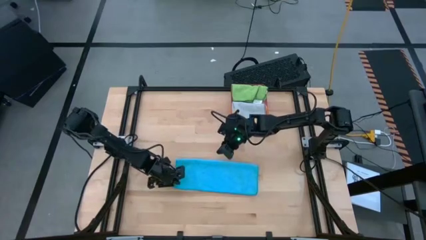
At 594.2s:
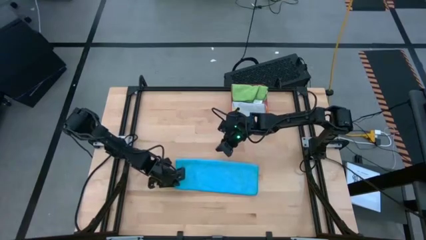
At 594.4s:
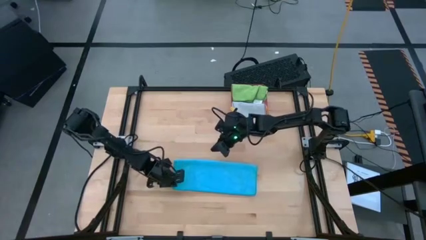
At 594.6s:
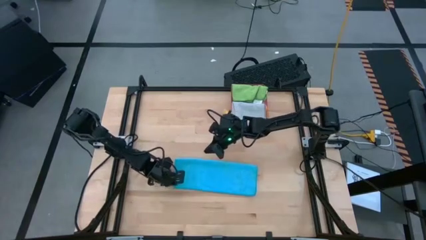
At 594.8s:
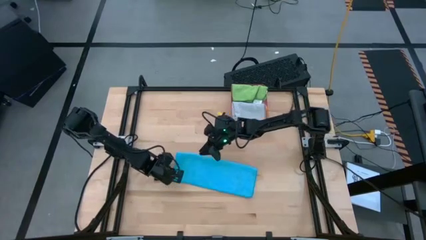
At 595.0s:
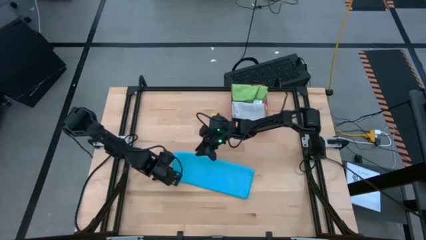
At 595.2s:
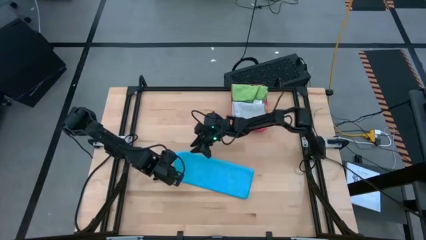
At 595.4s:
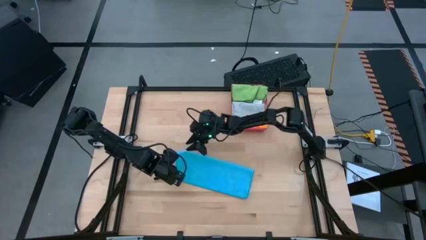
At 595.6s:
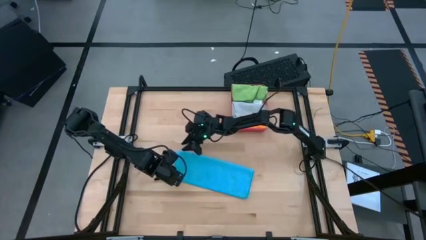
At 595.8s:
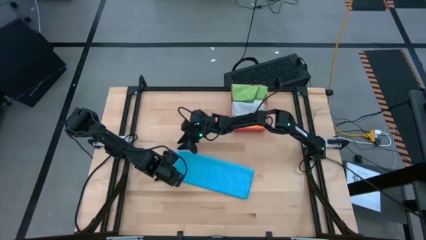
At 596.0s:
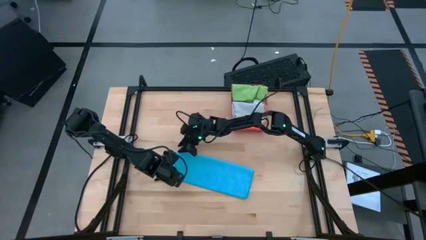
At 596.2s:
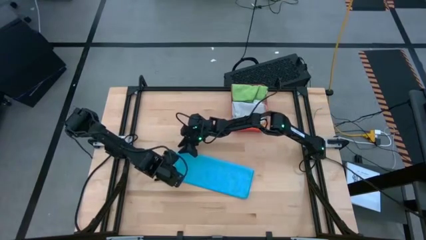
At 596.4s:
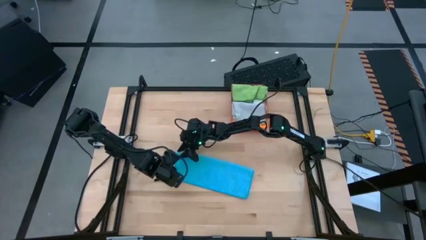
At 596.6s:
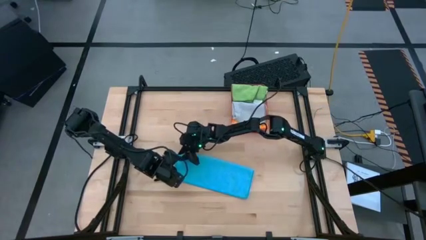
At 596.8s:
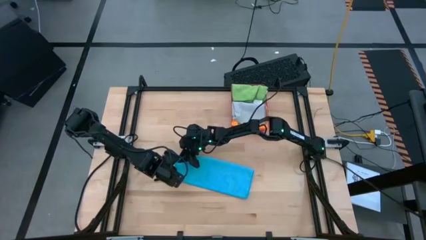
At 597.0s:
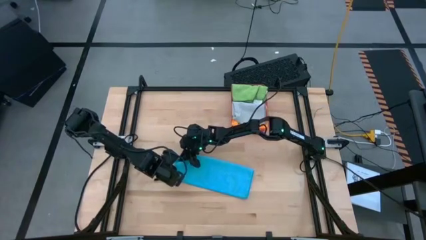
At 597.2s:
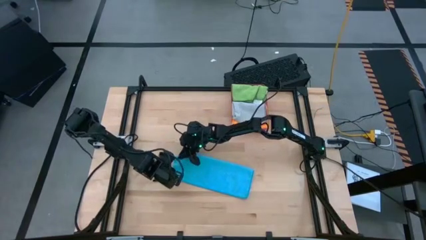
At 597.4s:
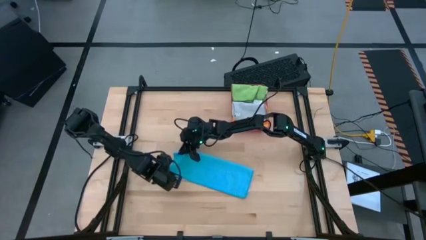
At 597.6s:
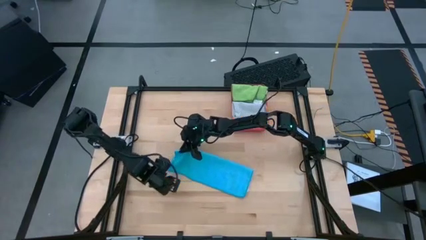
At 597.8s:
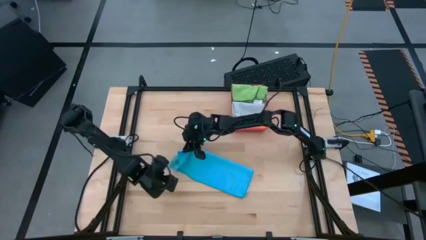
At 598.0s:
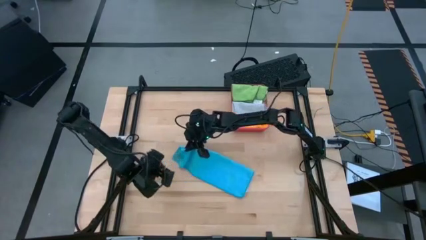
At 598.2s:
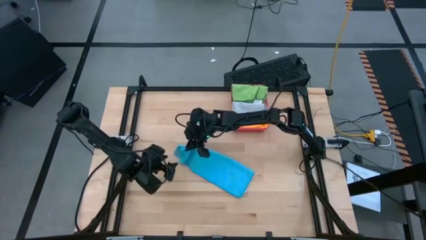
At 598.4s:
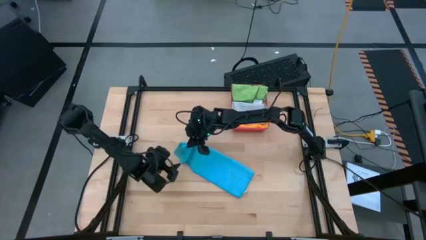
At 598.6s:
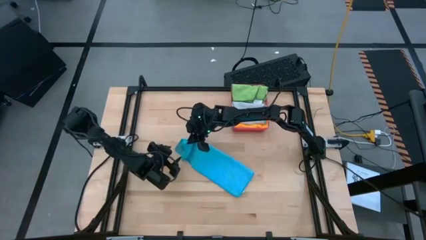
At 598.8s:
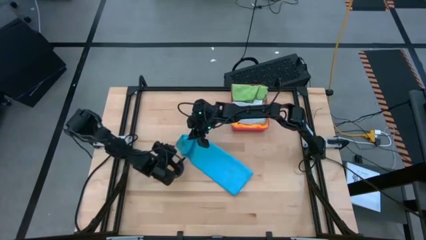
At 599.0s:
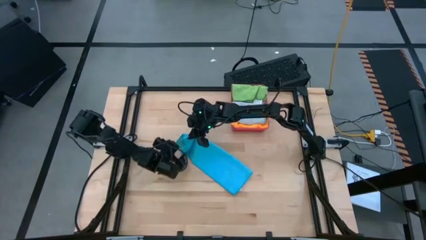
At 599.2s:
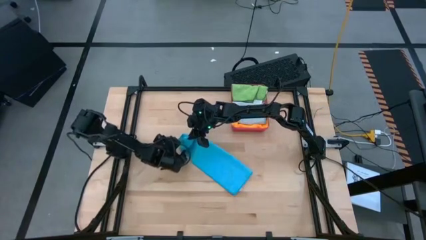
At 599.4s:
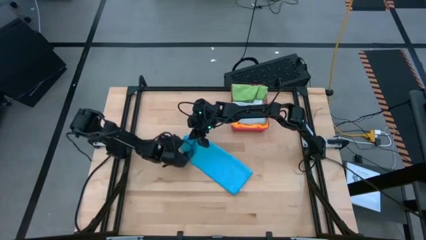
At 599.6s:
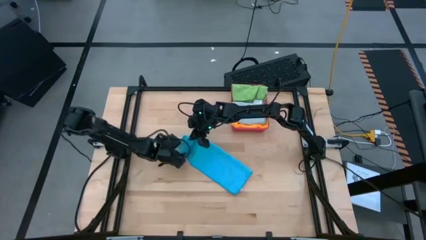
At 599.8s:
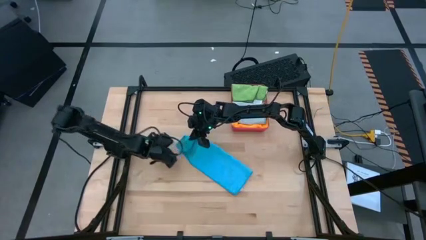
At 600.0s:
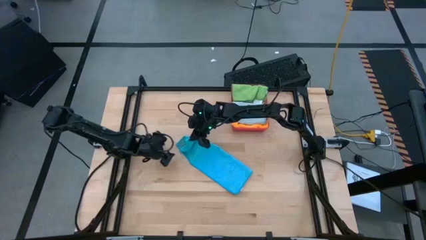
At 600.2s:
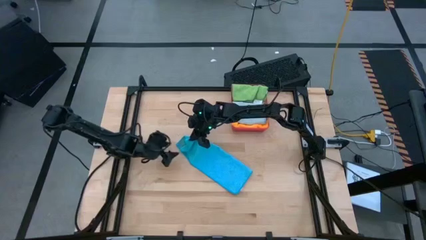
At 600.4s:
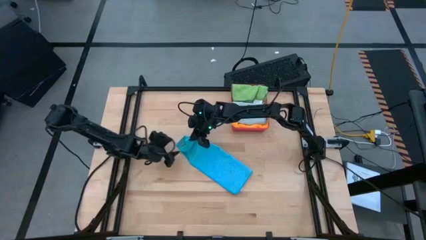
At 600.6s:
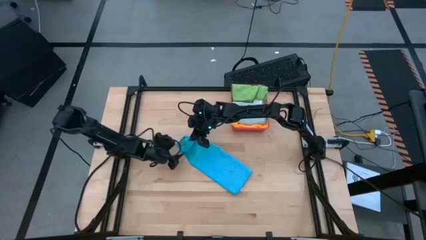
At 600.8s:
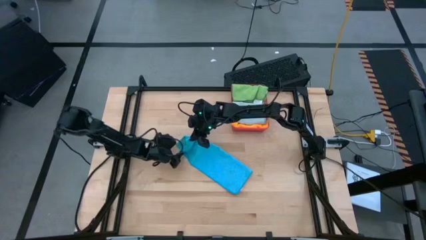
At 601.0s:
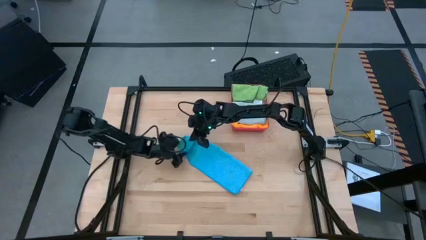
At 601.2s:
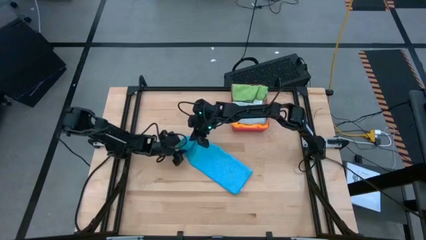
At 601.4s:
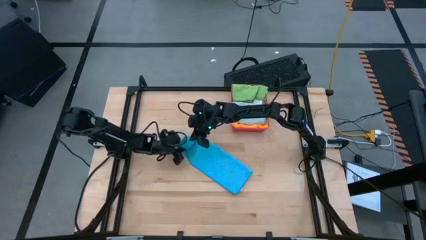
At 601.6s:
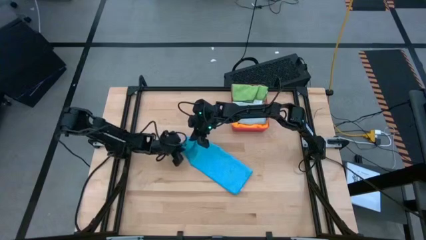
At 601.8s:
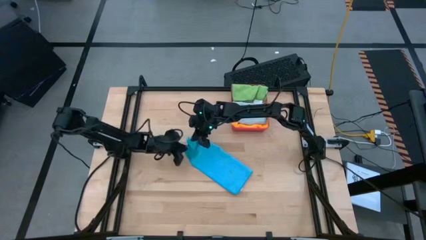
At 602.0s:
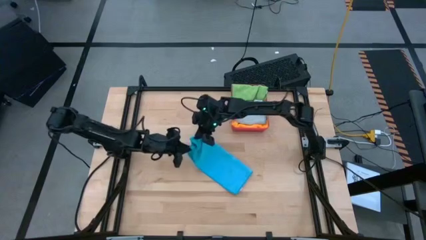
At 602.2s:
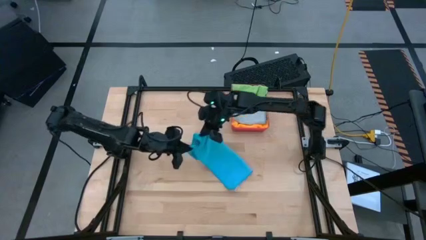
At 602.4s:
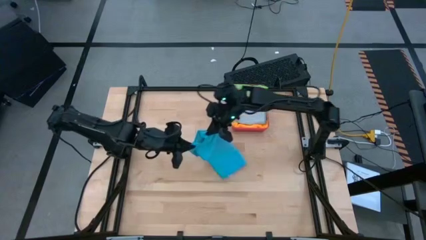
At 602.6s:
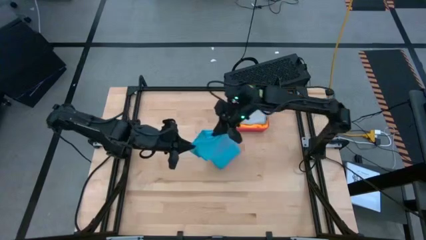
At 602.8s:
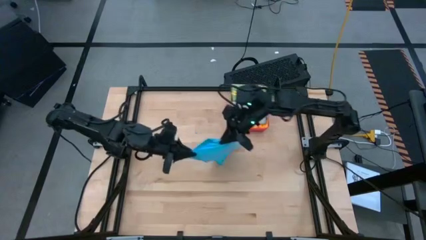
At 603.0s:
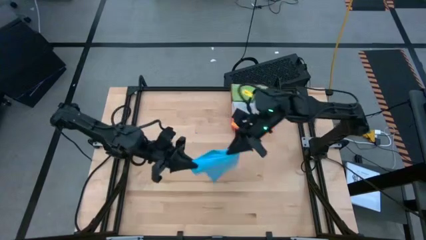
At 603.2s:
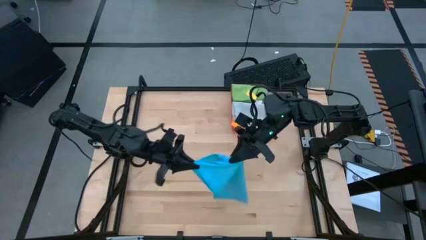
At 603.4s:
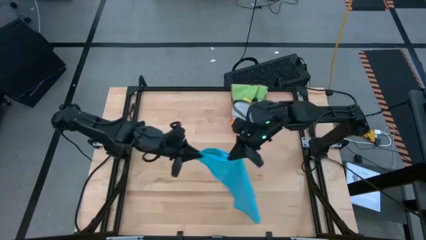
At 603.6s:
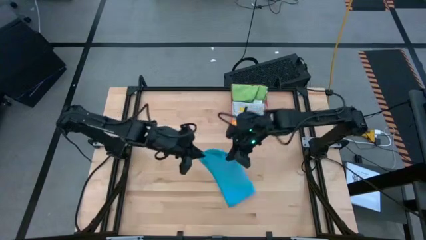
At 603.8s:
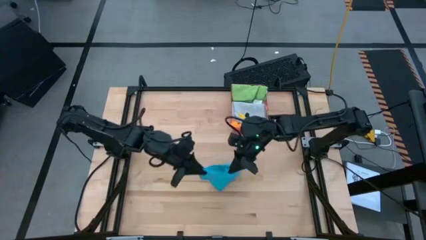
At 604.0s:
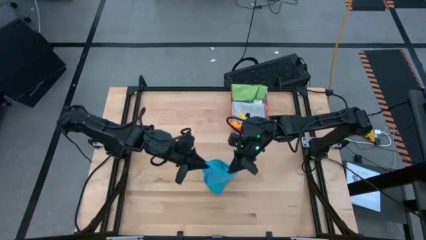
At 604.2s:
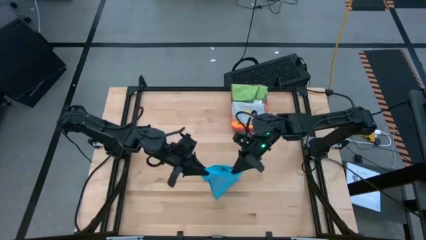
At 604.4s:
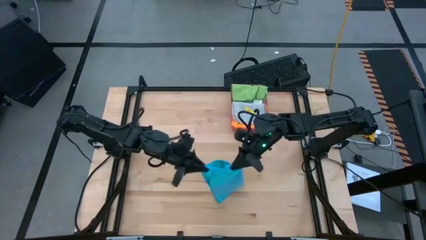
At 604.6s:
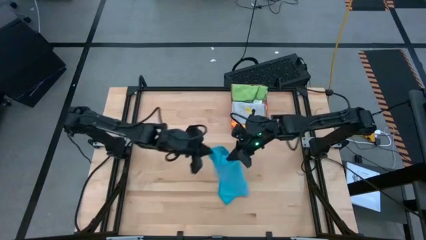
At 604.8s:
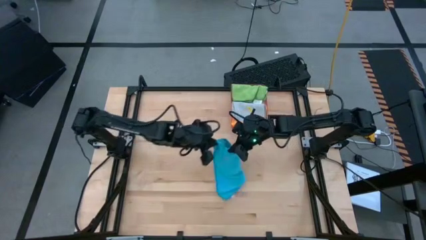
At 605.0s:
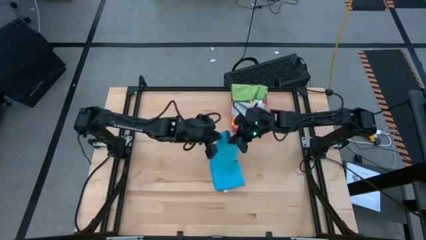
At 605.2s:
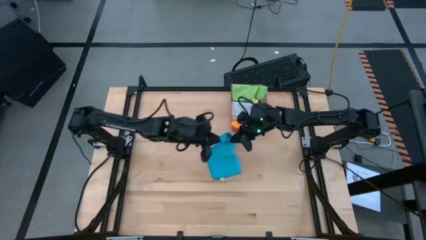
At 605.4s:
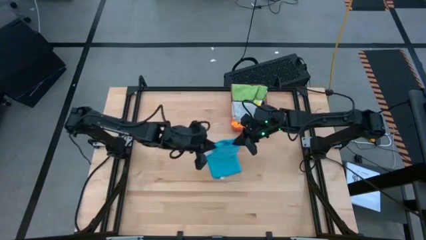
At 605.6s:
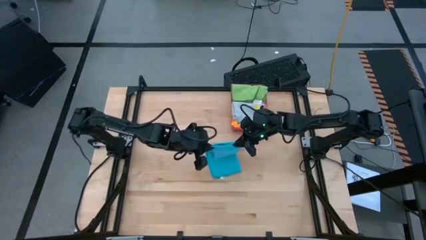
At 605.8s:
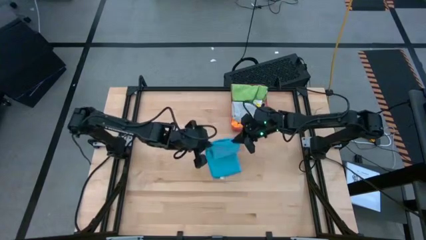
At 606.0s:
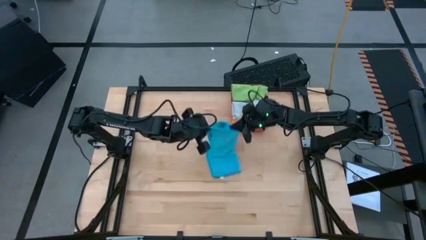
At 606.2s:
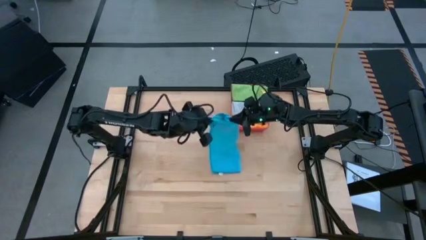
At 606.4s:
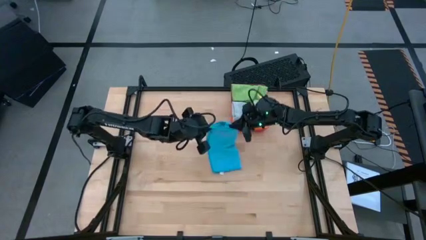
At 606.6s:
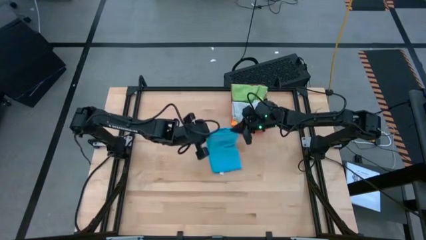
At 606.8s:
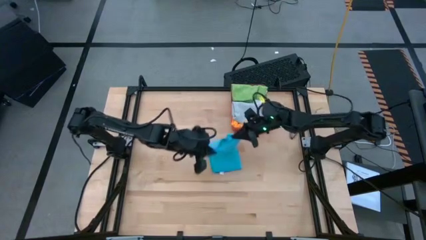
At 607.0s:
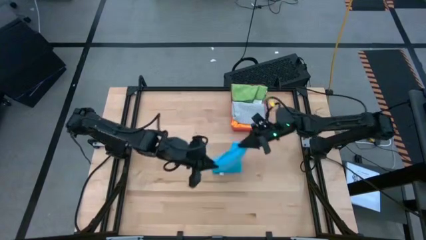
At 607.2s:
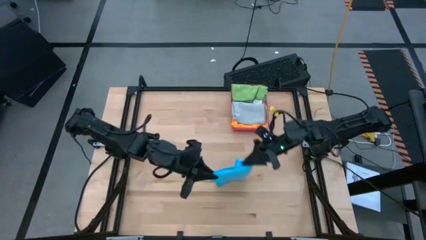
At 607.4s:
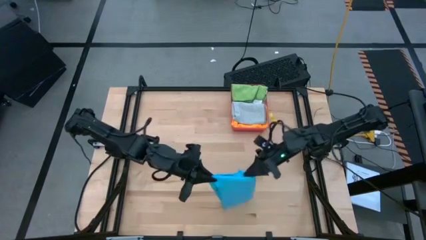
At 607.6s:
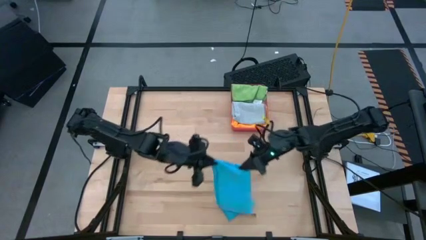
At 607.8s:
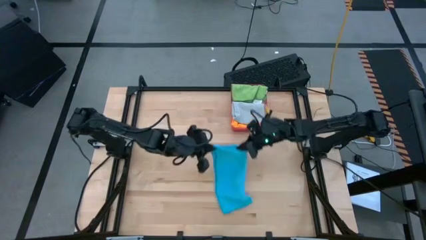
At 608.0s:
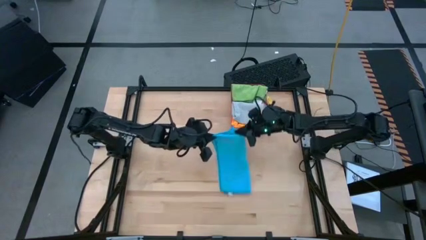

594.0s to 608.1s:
Task: Fold microfiber towels
Fold the blue microfiber cloth

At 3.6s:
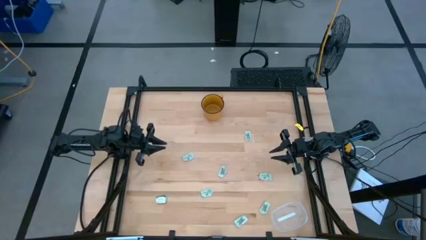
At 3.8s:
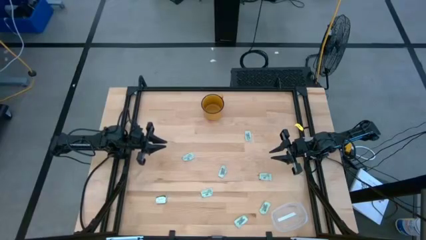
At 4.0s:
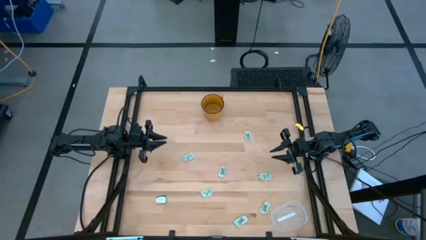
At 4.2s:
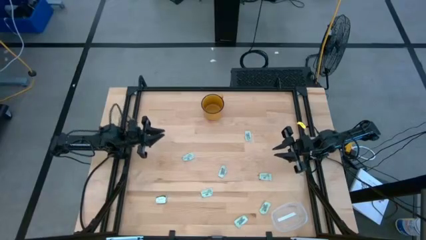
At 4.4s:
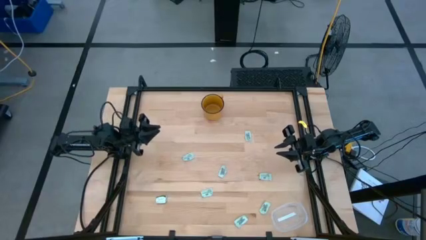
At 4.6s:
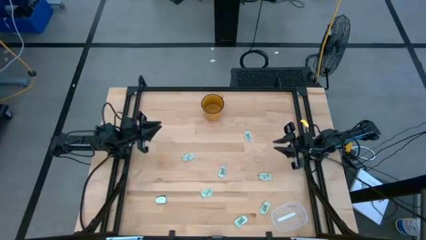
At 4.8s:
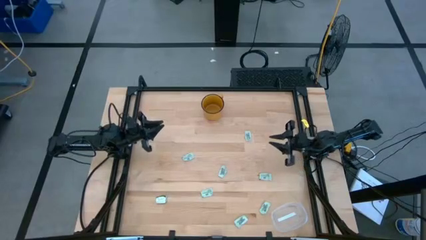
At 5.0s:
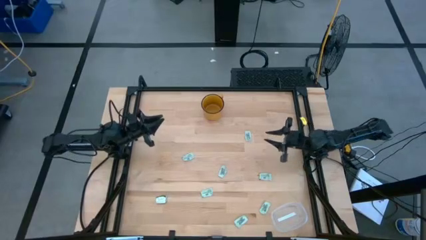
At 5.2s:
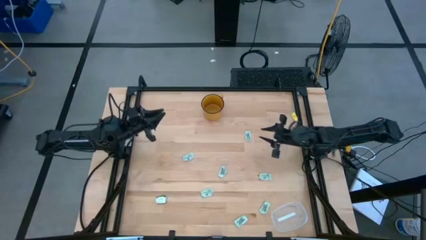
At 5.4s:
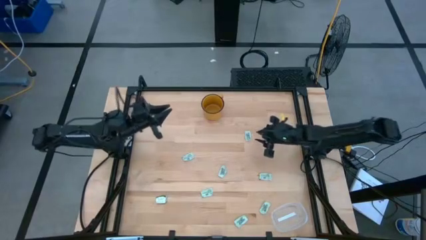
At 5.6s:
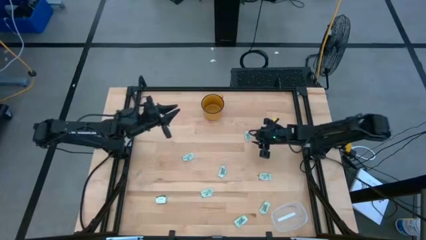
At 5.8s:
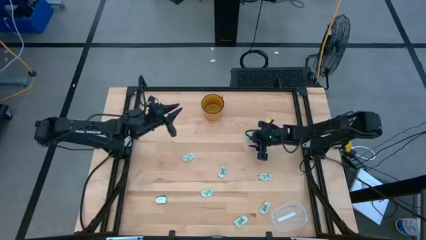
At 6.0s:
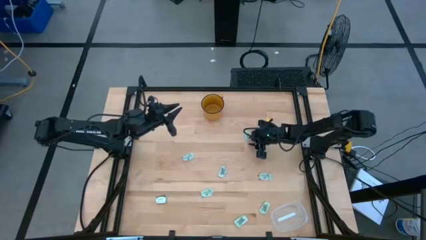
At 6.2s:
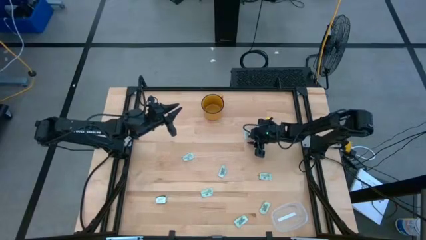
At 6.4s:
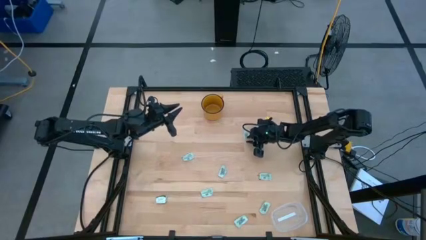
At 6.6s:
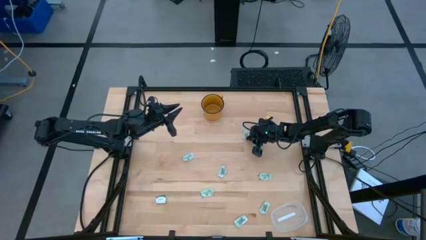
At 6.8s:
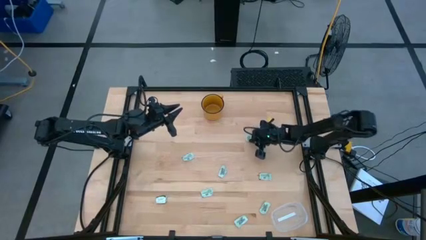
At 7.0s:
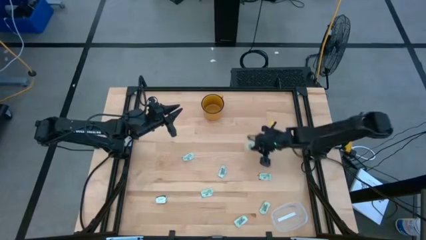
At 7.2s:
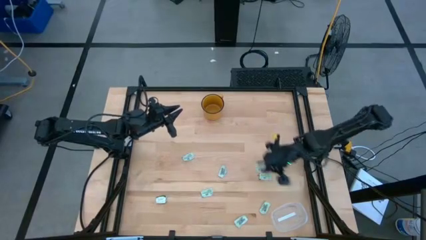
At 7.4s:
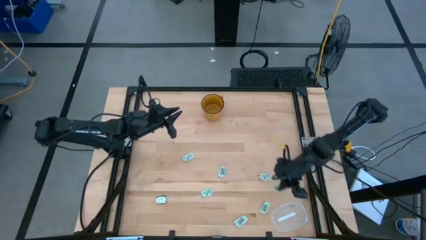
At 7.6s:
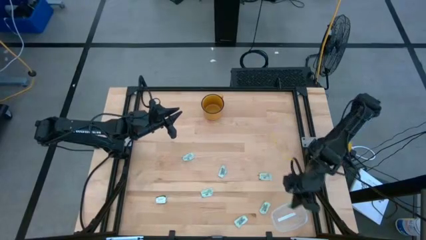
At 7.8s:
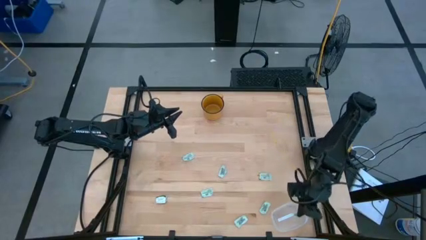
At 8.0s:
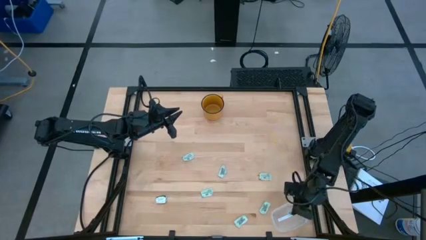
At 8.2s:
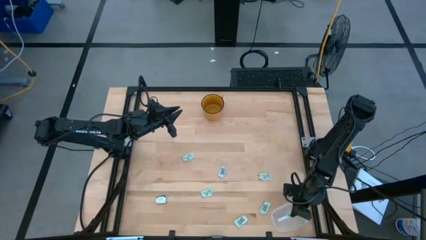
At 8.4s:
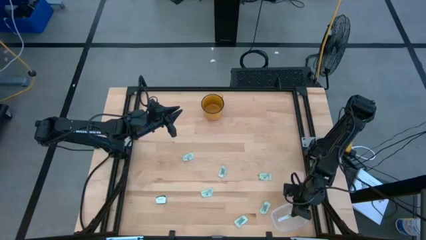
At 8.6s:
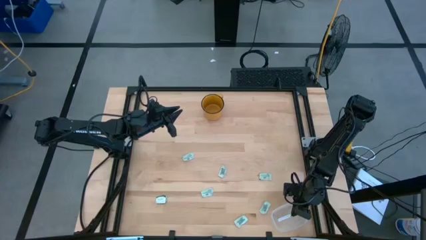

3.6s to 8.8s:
Task: Pick and place Stevia / Truvia into bins
Put the stevia packet into the transparent bin
